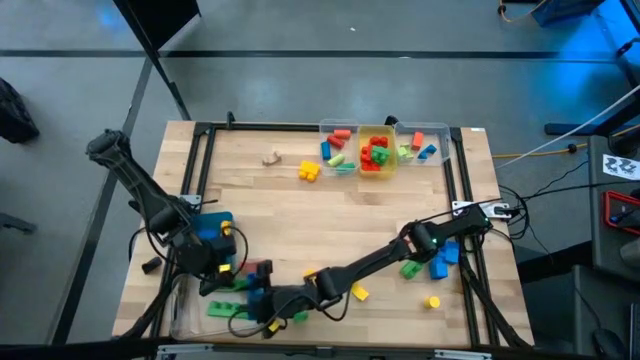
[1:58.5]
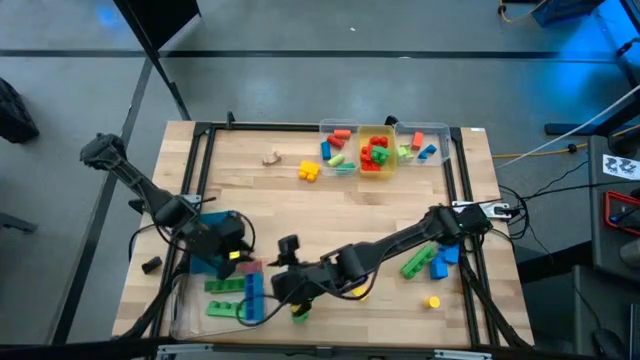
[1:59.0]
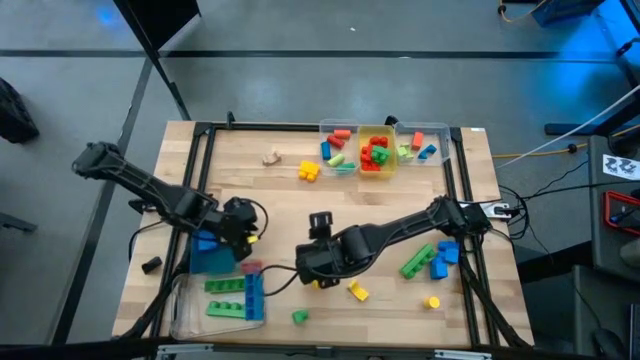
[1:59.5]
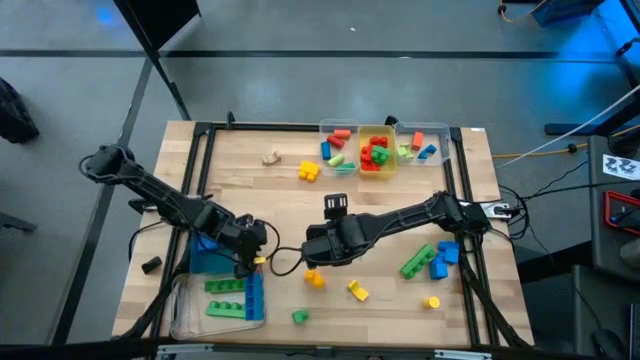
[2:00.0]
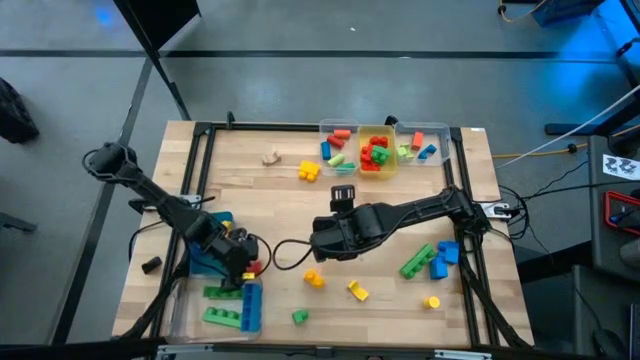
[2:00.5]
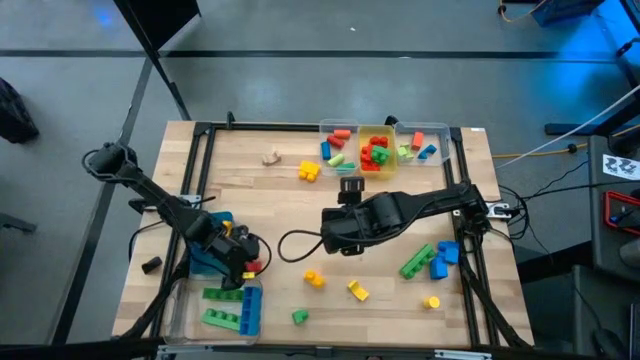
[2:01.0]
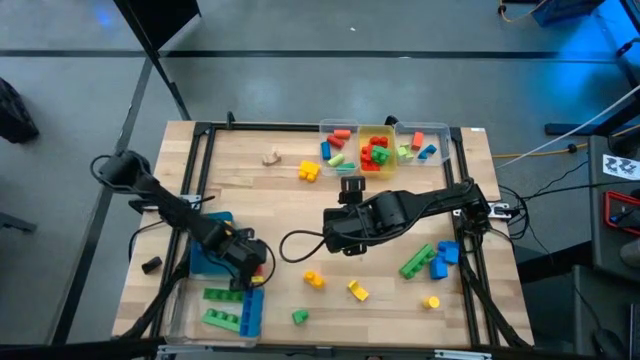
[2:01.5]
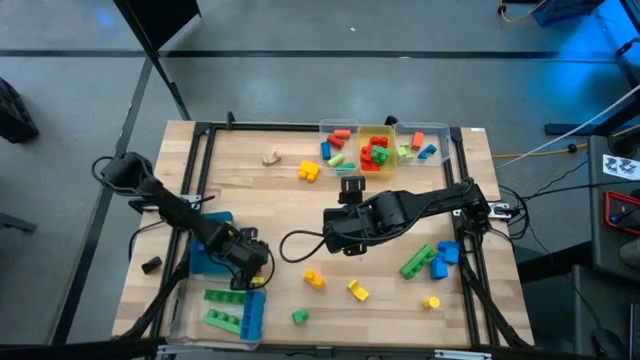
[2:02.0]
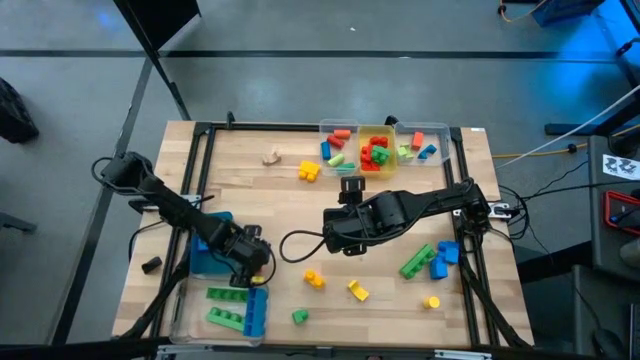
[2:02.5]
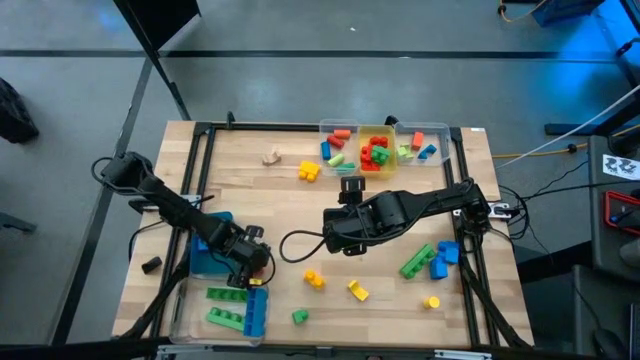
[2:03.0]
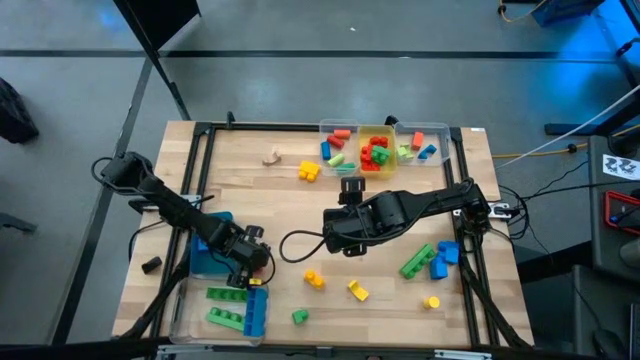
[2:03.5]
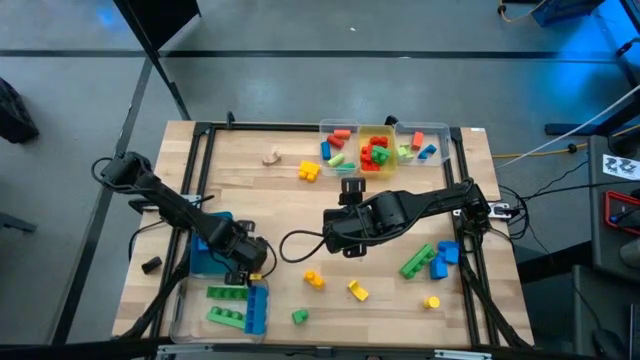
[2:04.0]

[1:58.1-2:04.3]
Task: Sort blocks by size
Put the red arch block into the top right transparent bin

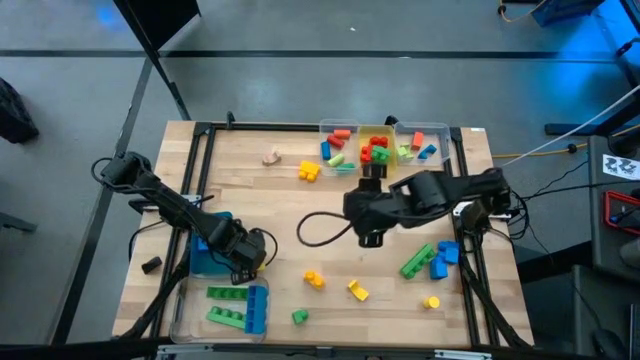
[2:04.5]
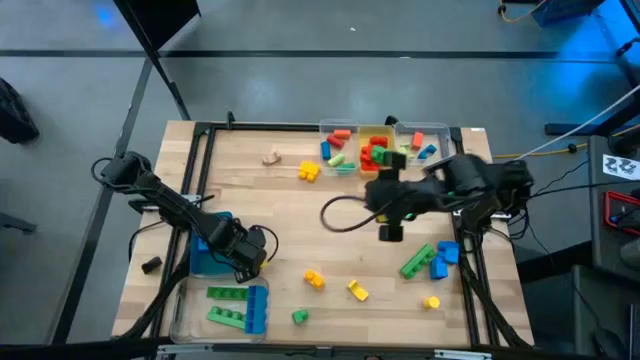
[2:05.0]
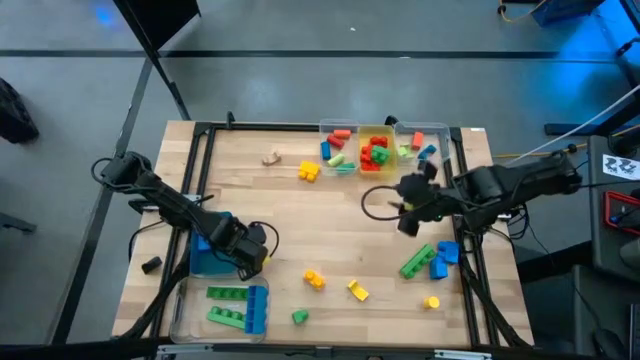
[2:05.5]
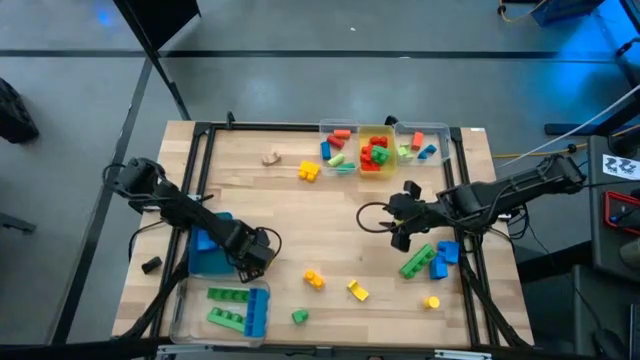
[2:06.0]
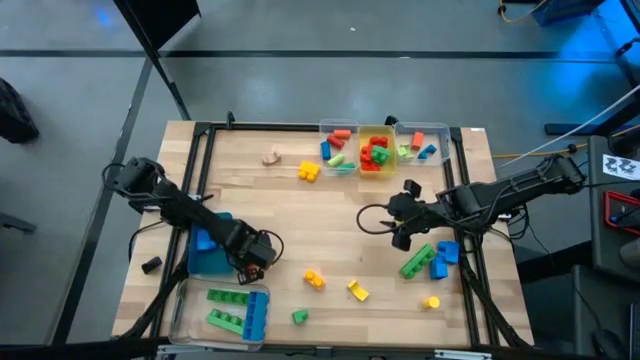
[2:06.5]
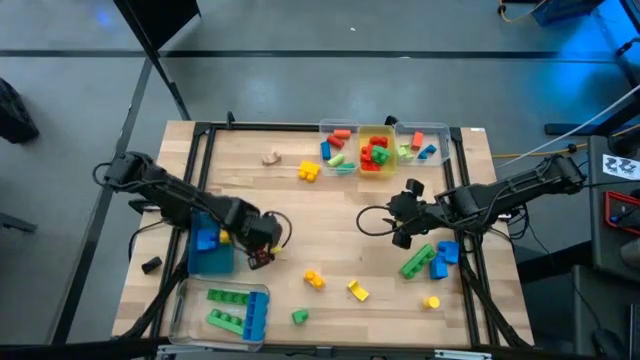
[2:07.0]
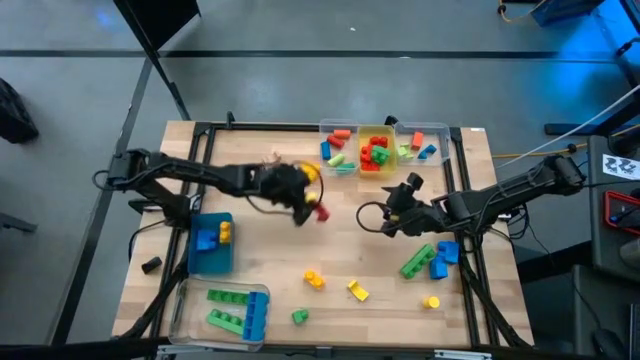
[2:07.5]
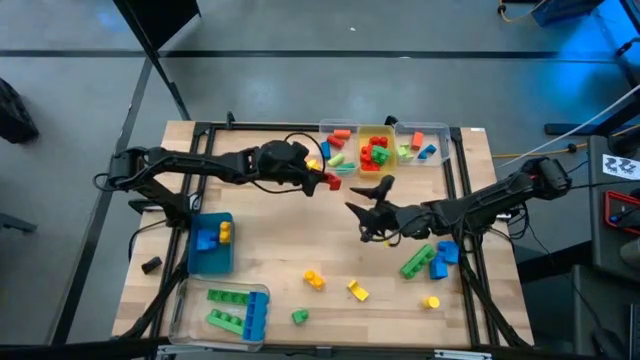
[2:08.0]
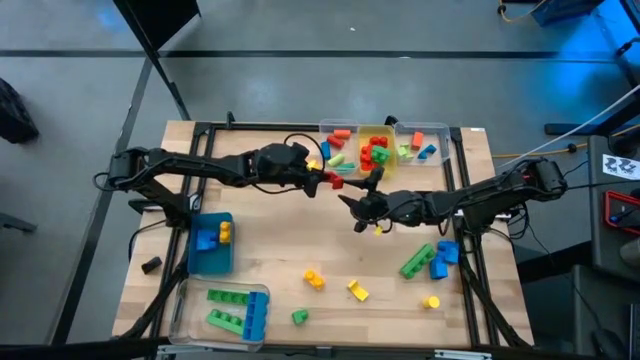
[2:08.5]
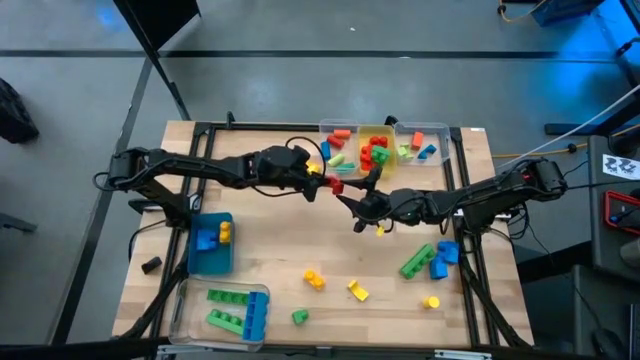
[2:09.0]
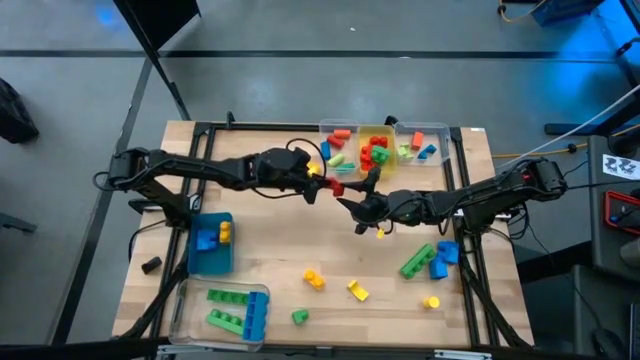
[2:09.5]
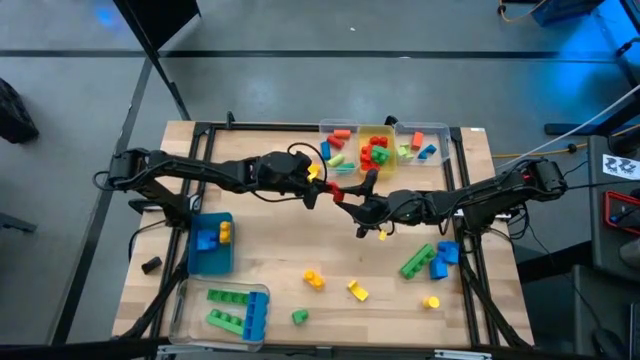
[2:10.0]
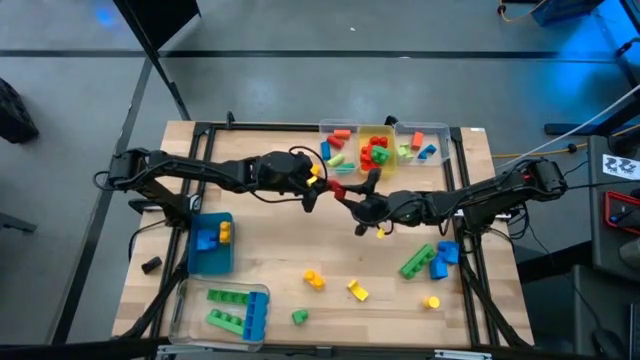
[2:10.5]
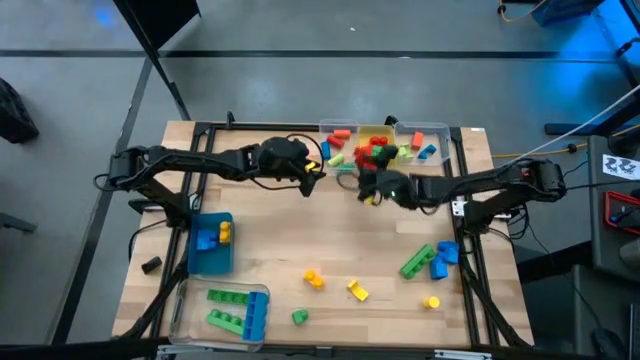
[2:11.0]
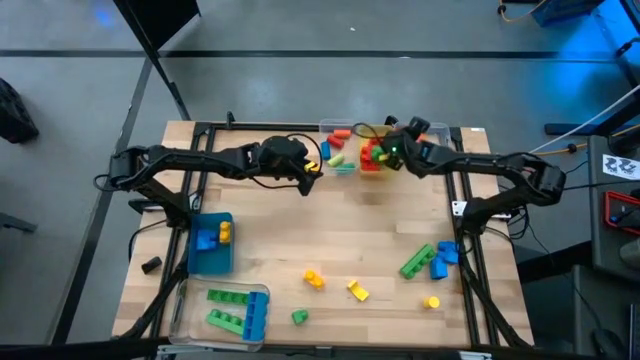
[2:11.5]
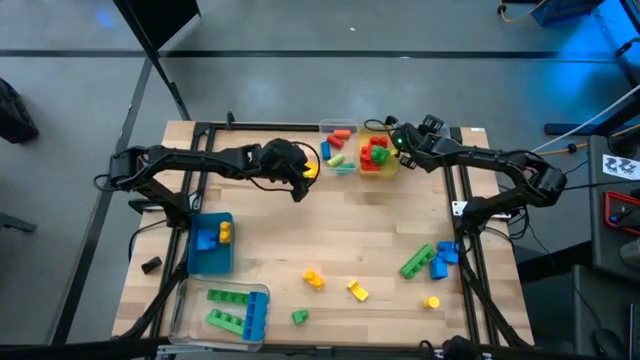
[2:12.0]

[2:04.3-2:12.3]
Put the red arch block into the top right transparent bin

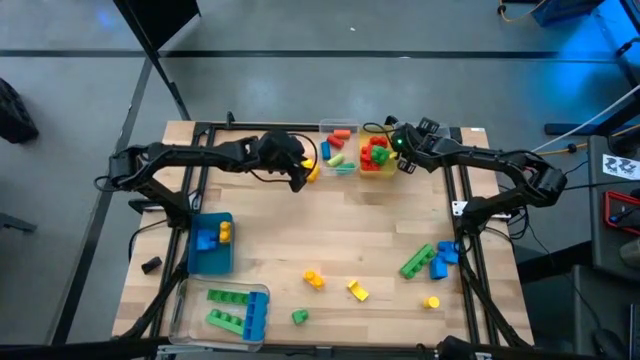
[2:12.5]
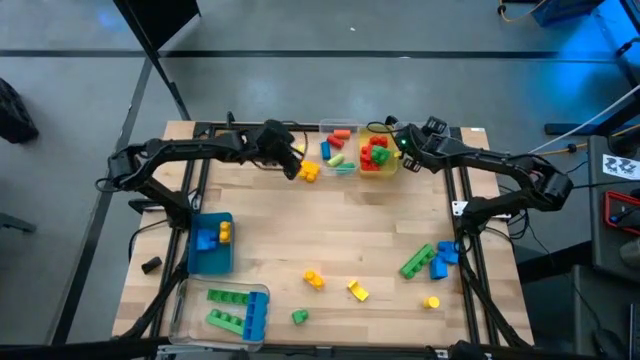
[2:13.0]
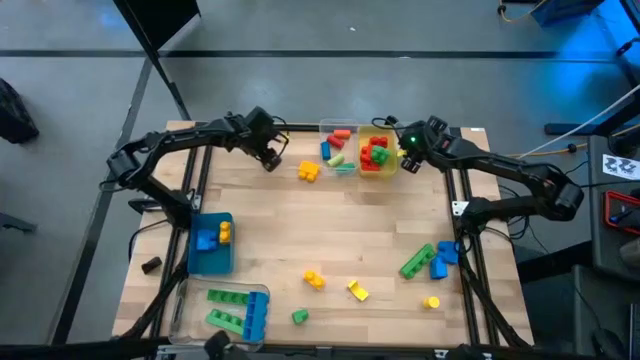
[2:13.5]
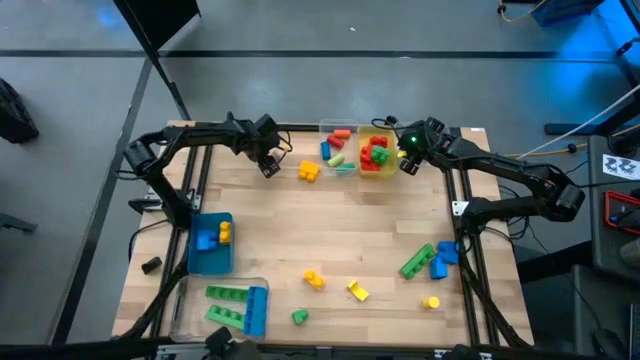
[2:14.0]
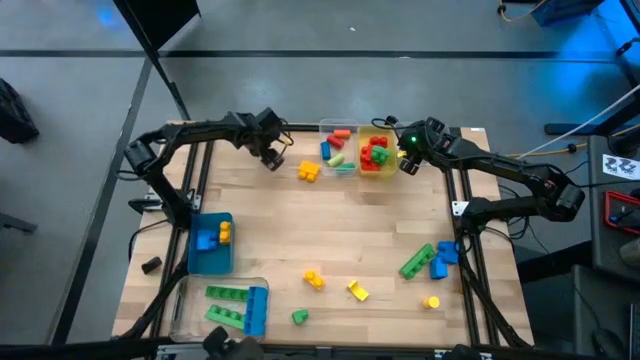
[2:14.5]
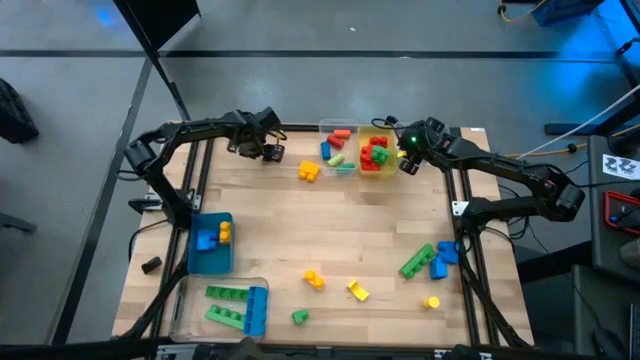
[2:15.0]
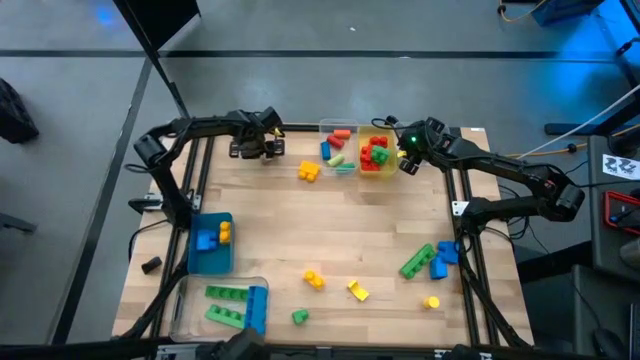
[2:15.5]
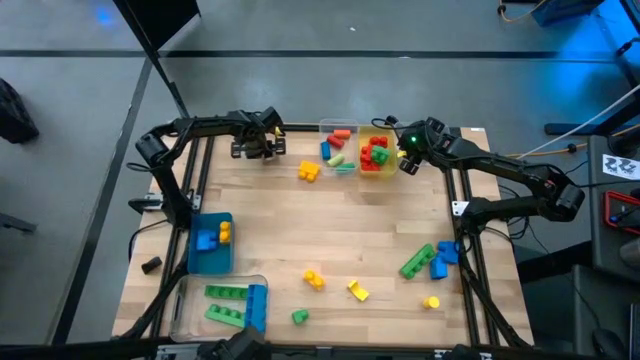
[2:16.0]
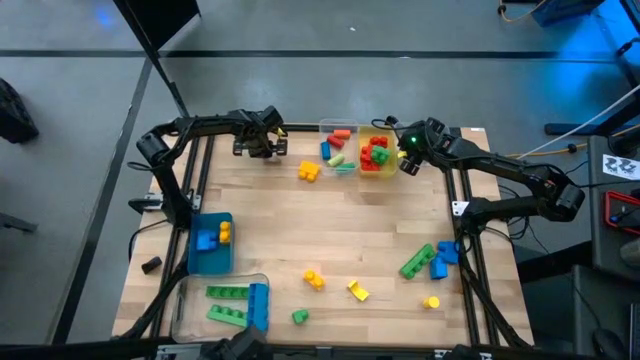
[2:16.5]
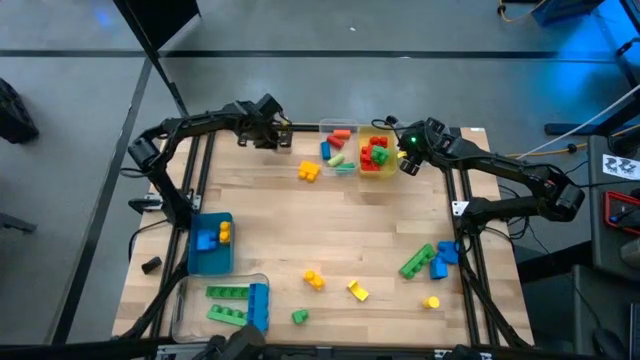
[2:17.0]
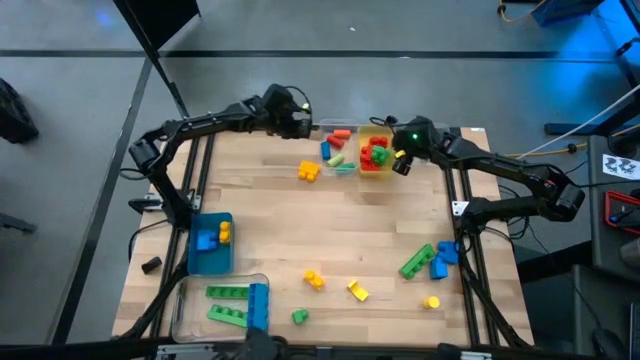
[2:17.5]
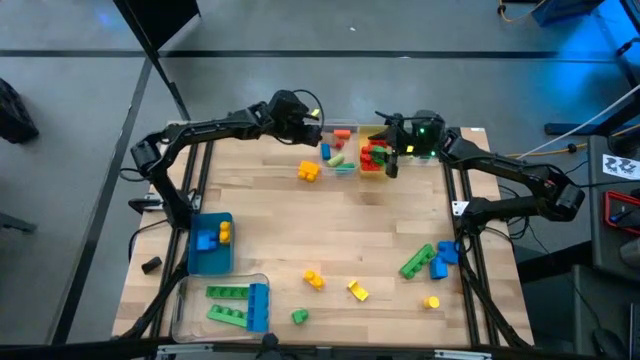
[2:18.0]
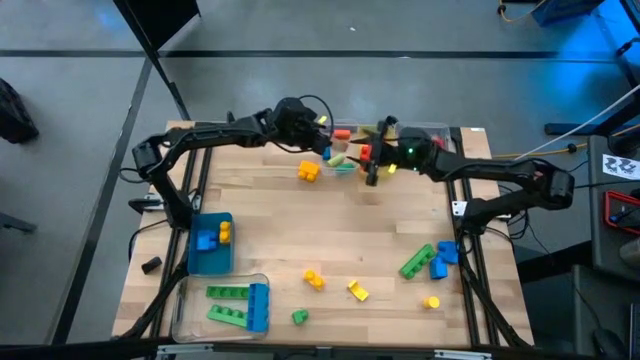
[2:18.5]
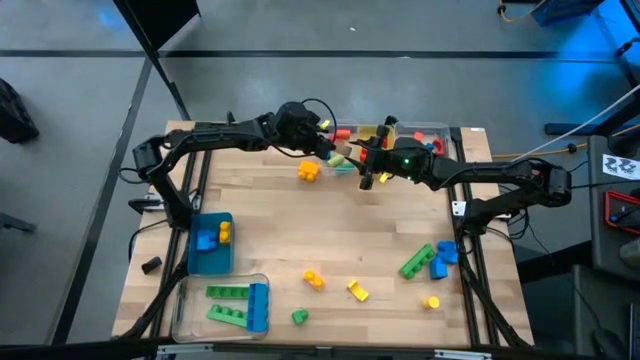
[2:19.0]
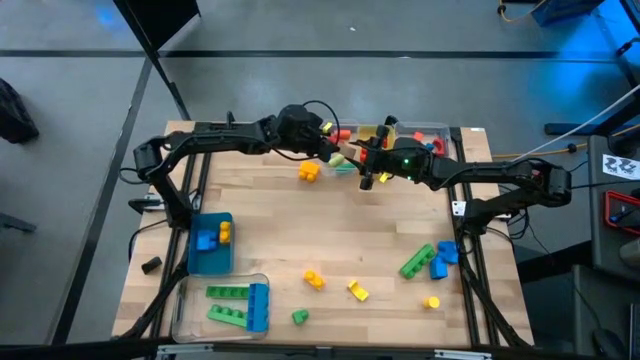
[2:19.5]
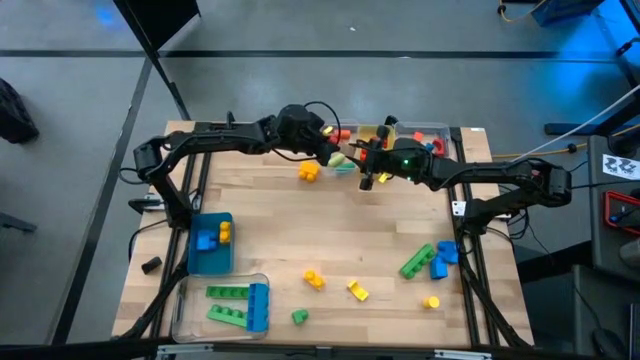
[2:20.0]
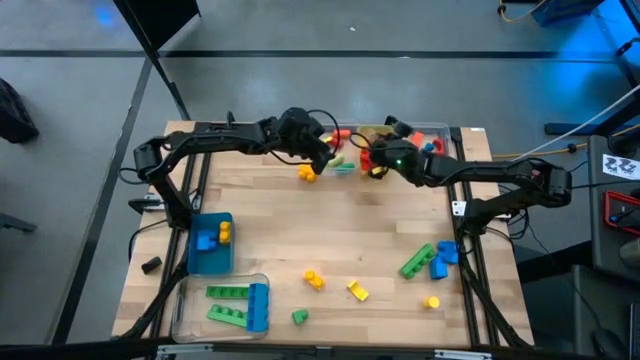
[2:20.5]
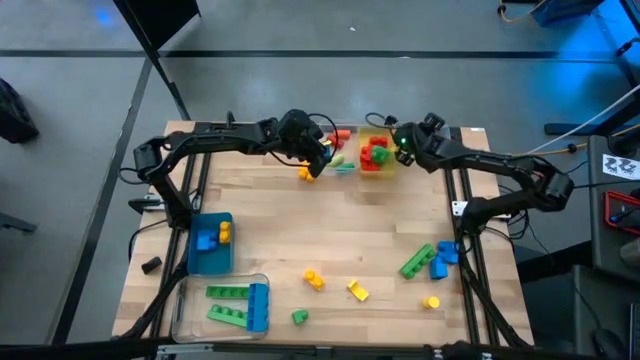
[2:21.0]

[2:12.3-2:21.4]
Put the brown arch block into the top right transparent bin
